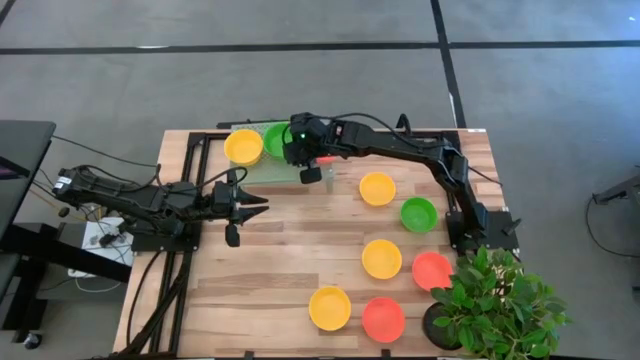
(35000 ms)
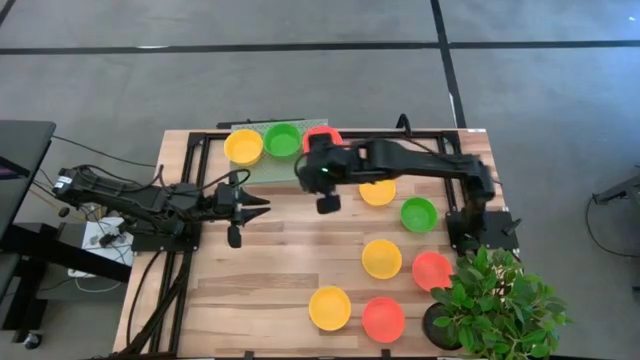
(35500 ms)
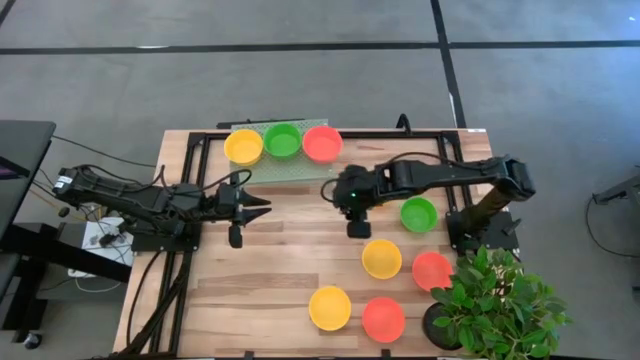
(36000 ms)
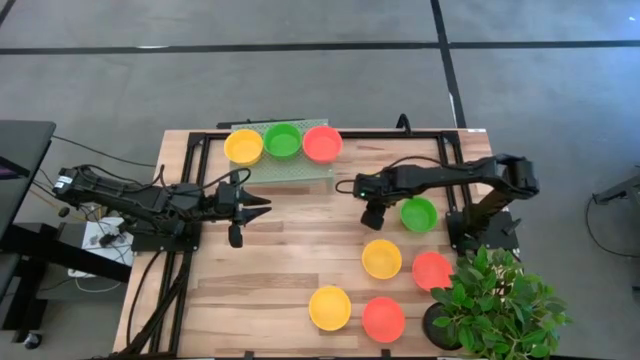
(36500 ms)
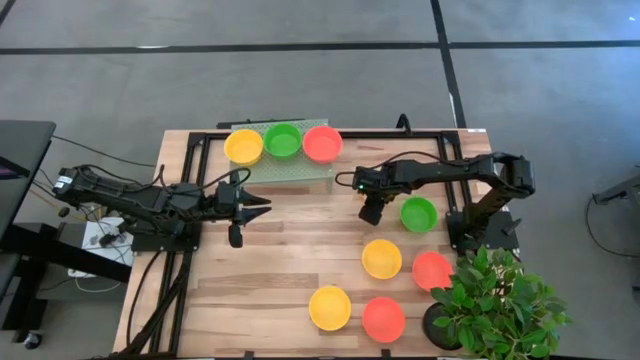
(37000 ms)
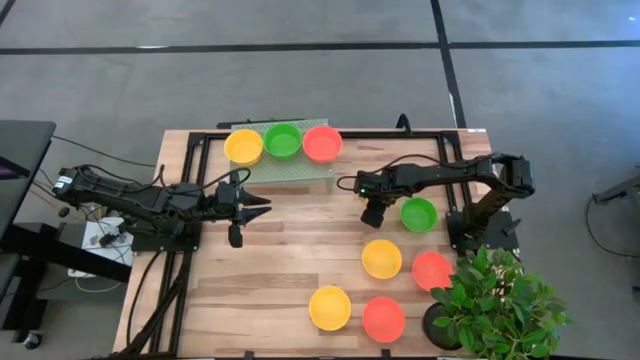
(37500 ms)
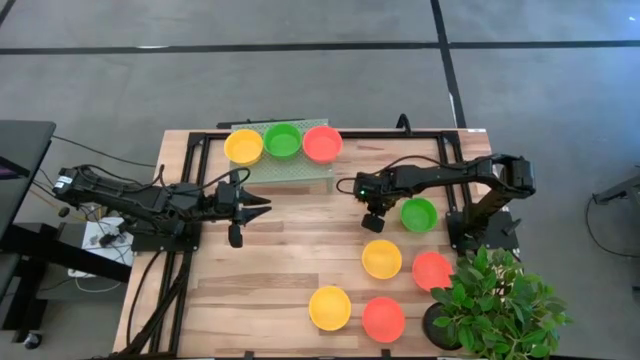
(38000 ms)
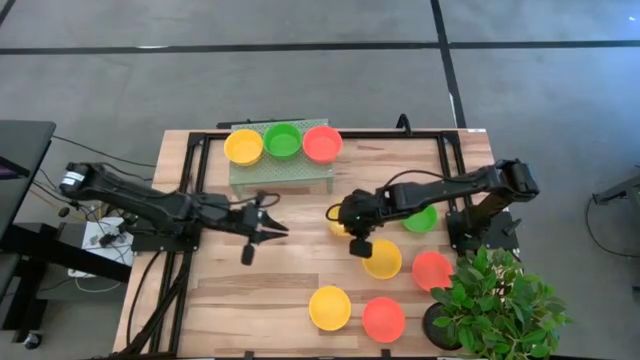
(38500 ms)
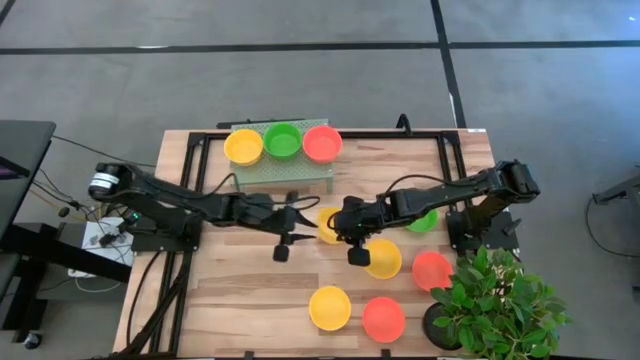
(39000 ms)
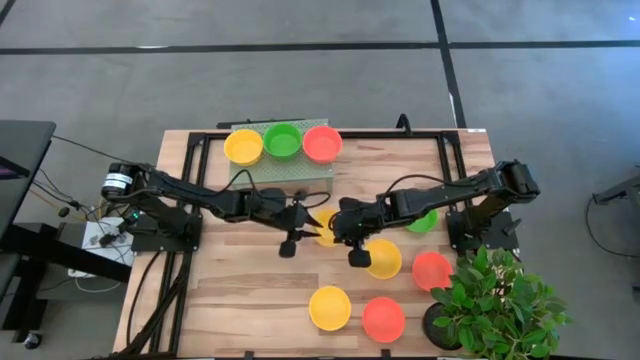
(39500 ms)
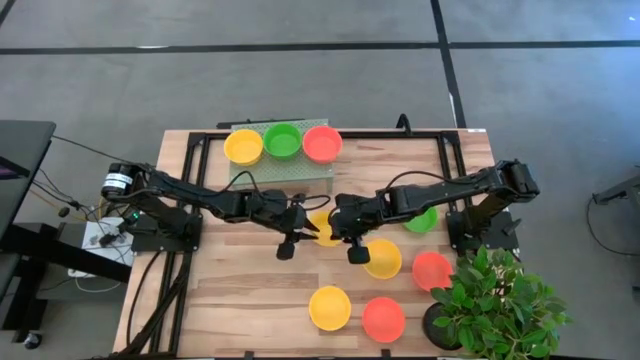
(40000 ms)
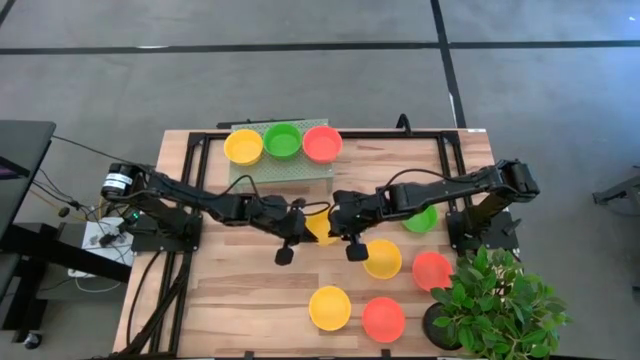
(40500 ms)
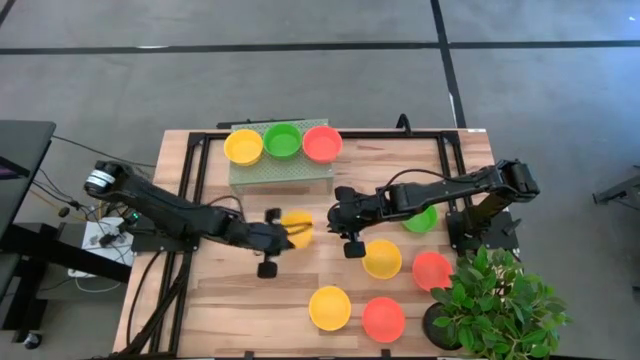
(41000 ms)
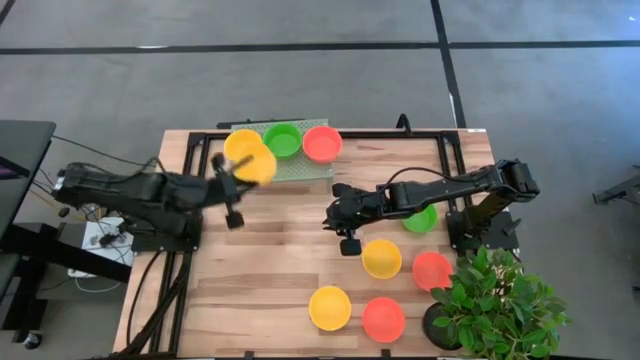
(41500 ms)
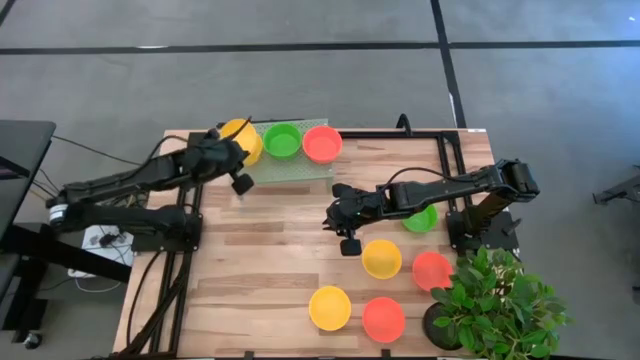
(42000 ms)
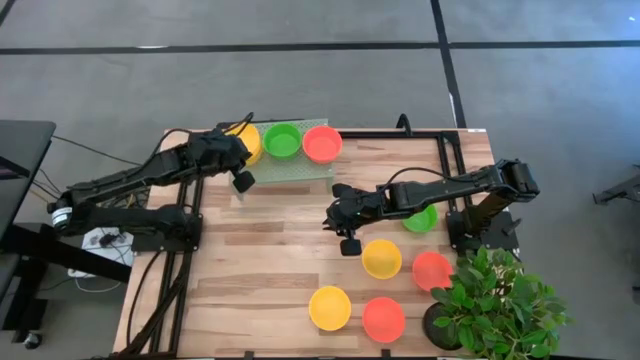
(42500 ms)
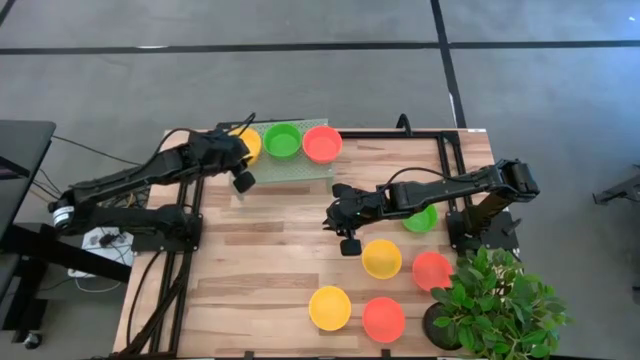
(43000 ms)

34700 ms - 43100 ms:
Task: Pick & Place Mini bowls
Stack the yellow bowl on top of the other yellow bowl on the shelf

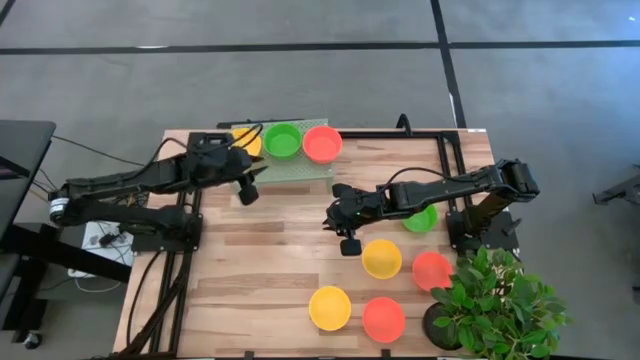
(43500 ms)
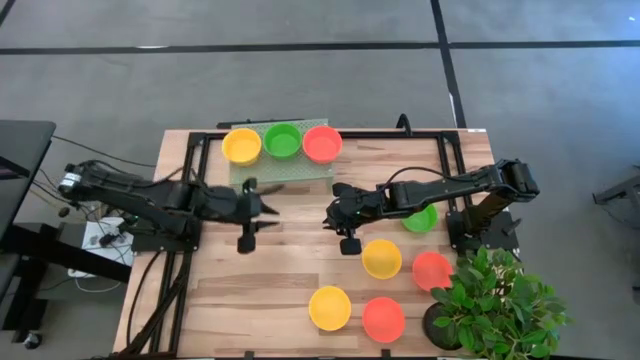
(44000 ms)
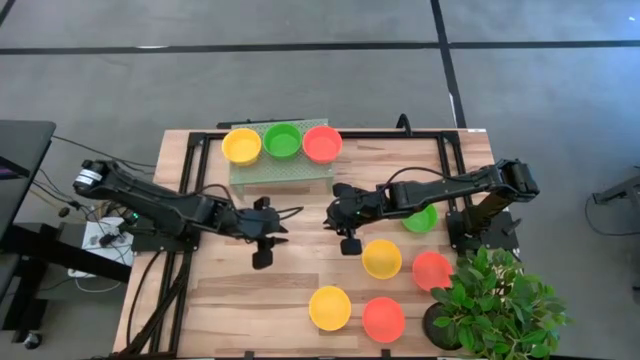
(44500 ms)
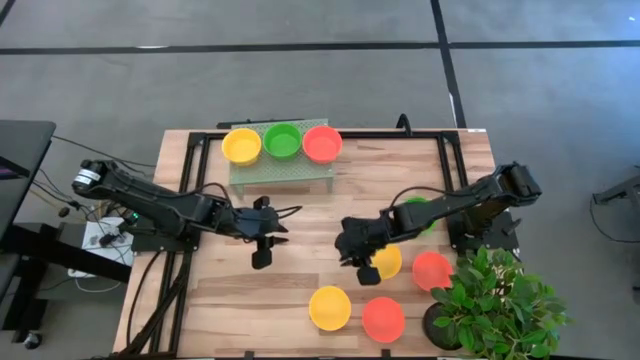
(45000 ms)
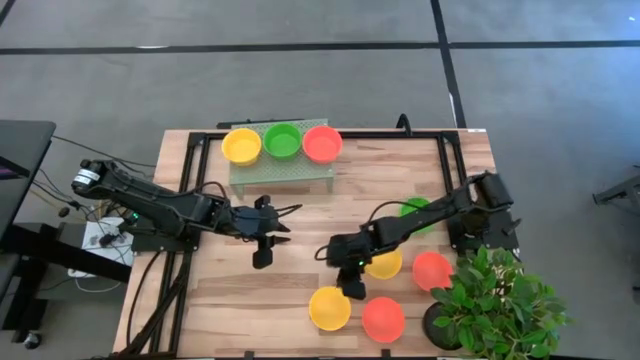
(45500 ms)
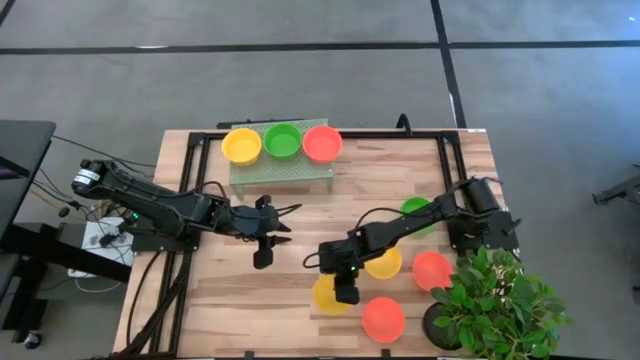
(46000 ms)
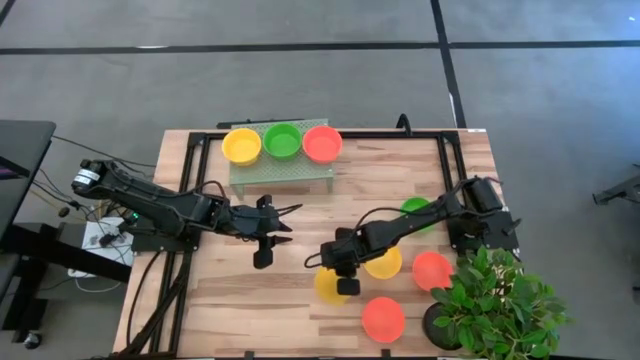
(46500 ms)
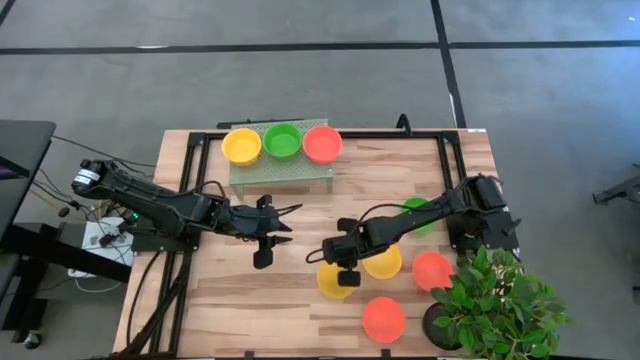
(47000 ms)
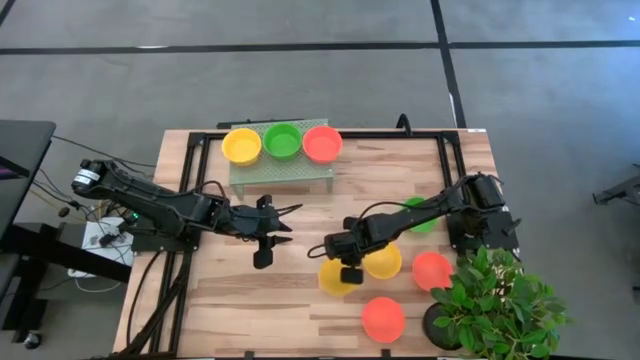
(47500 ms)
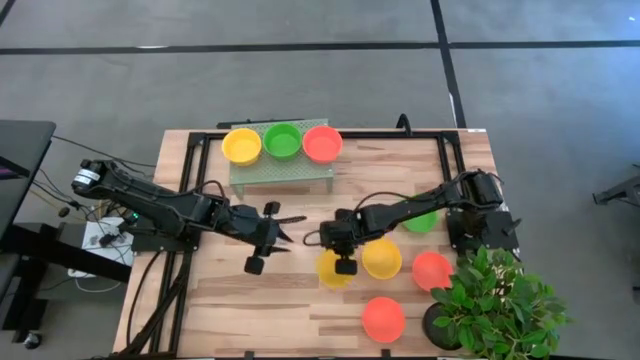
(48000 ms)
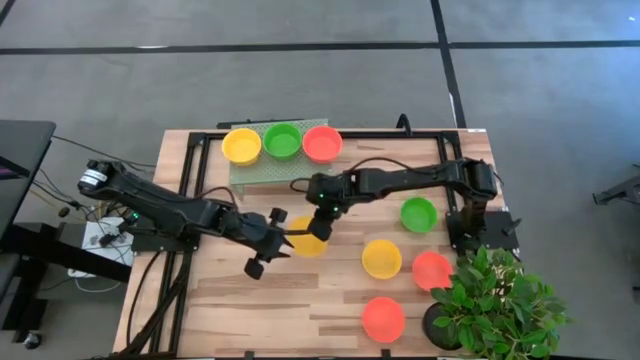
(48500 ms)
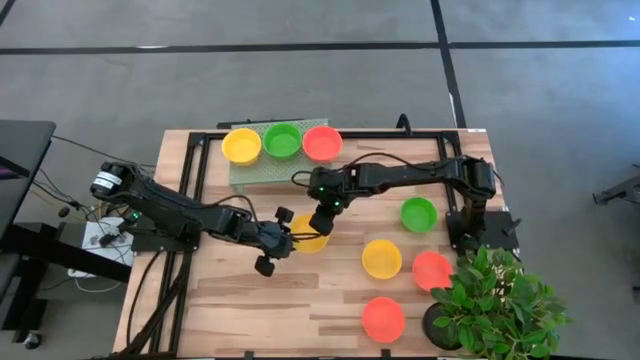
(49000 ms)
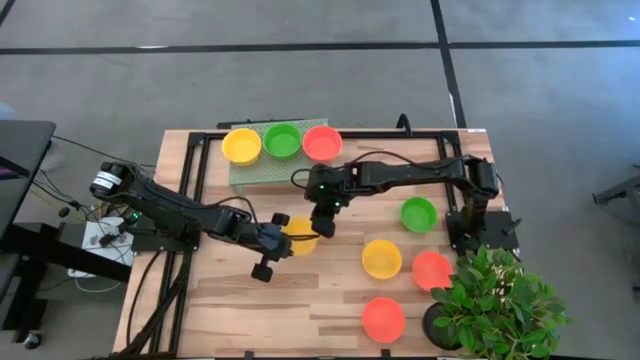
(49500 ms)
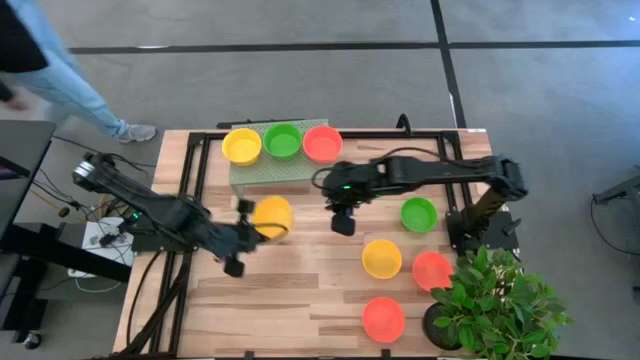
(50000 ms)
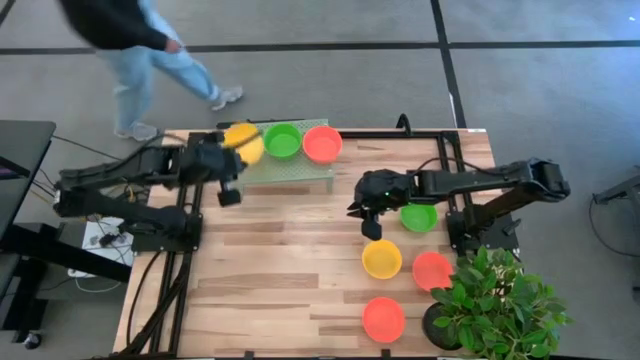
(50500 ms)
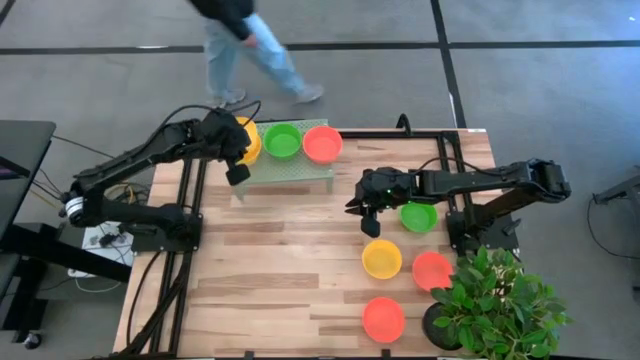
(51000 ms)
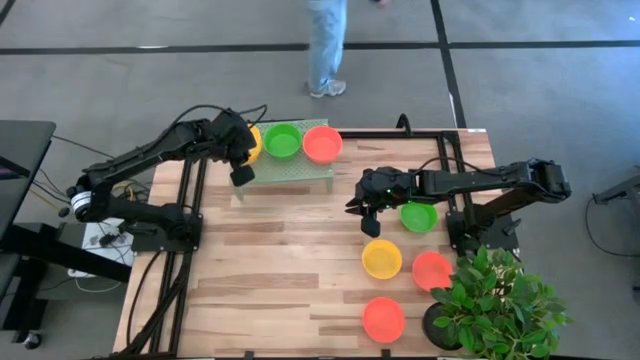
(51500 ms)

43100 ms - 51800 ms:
Stack the yellow bowl on top of the other yellow bowls on the shelf

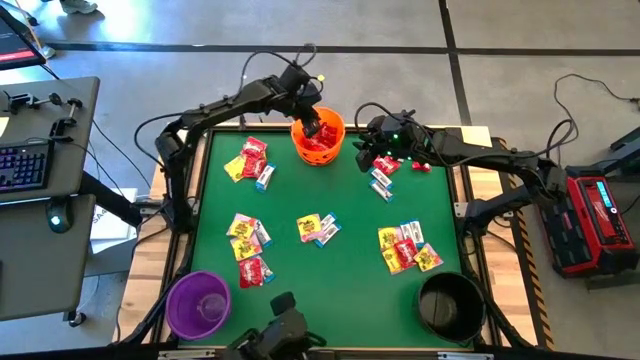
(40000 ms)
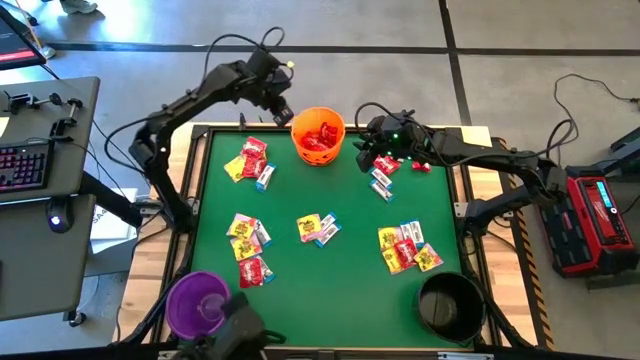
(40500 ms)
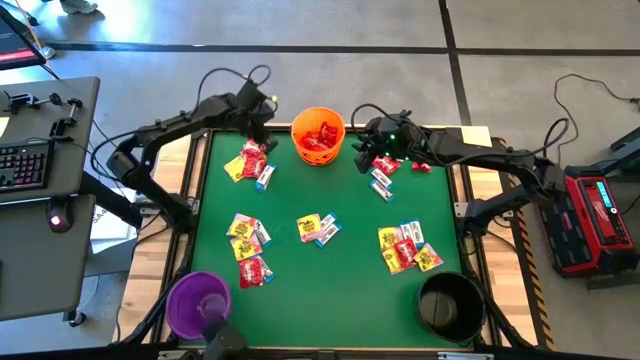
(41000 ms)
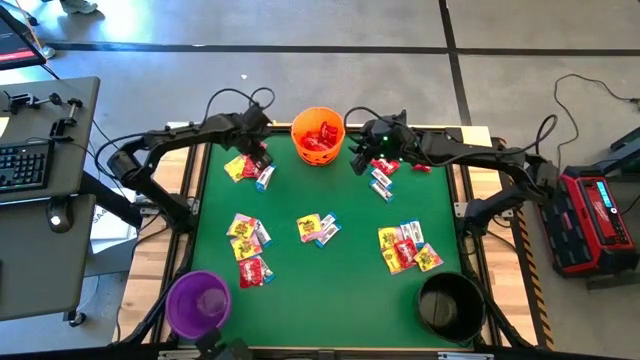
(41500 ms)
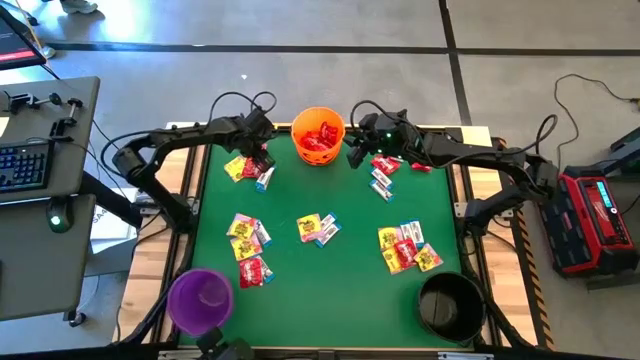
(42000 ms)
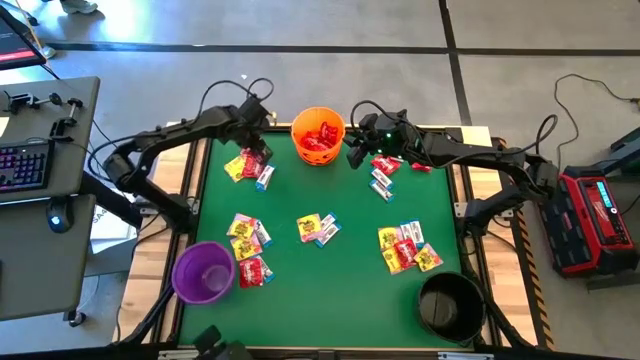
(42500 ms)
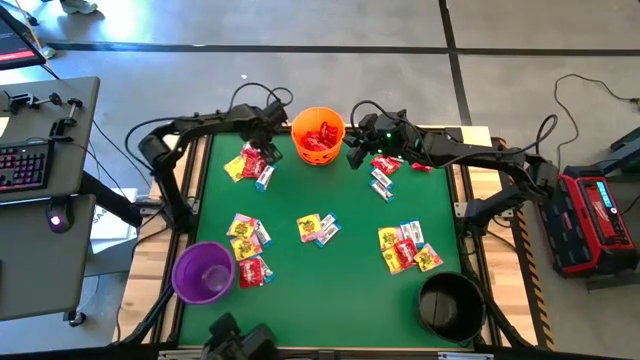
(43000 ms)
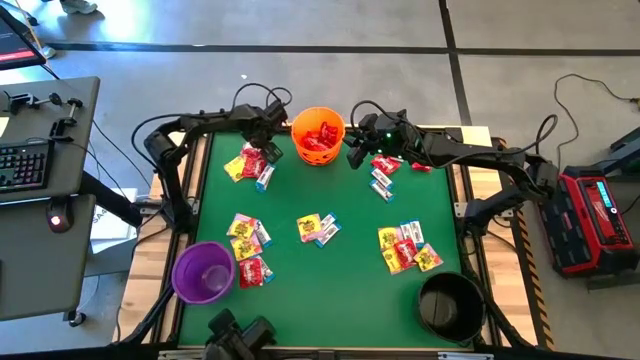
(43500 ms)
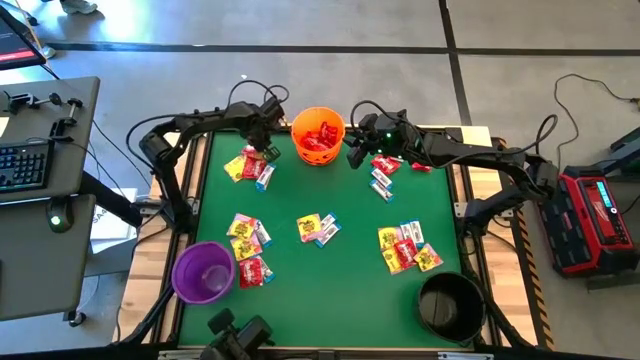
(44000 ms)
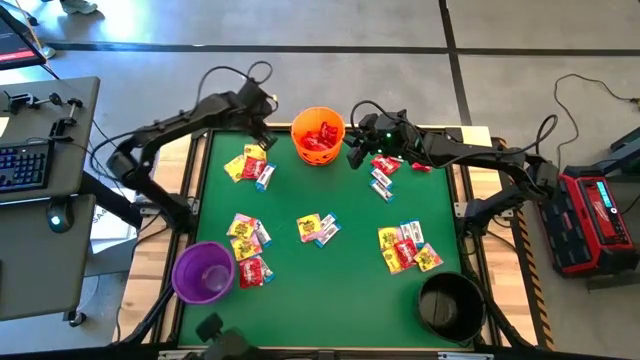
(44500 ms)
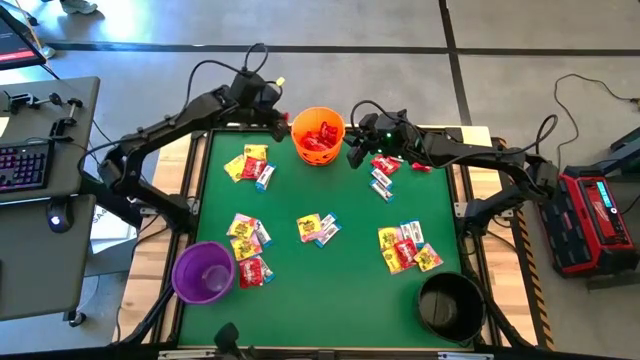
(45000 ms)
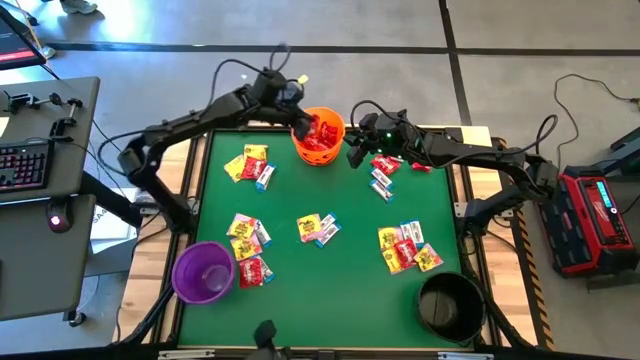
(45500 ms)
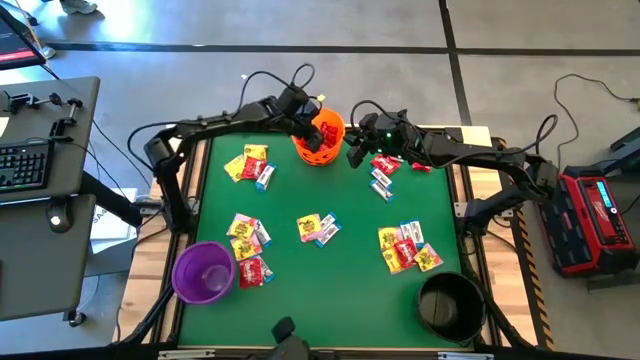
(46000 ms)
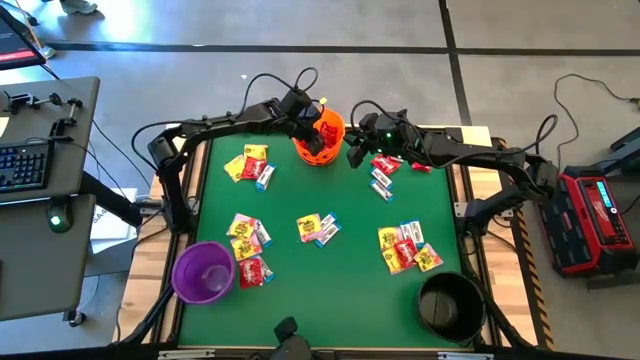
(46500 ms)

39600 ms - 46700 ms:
Task: Sort candy by brand, put in halloween buckets
Put the red candy into the orange bucket
